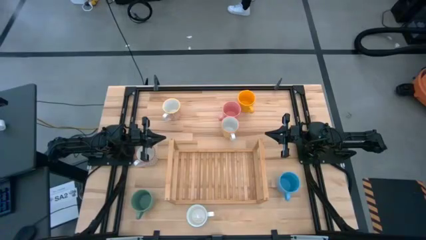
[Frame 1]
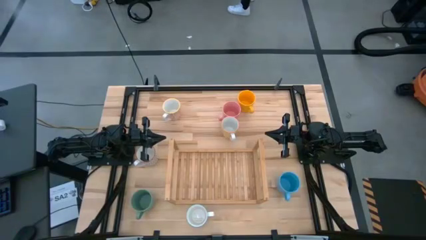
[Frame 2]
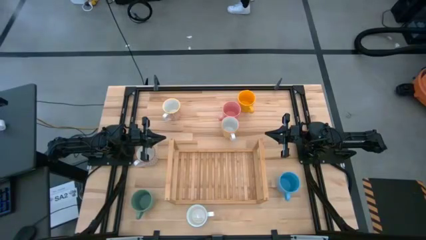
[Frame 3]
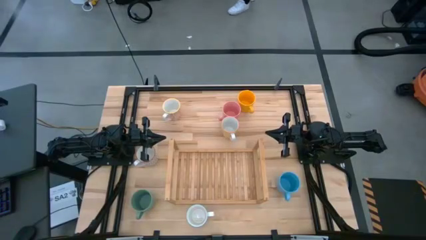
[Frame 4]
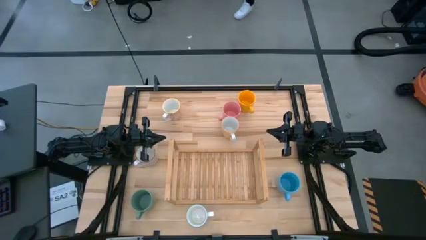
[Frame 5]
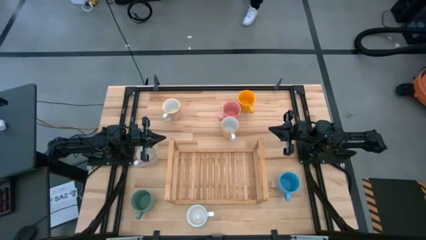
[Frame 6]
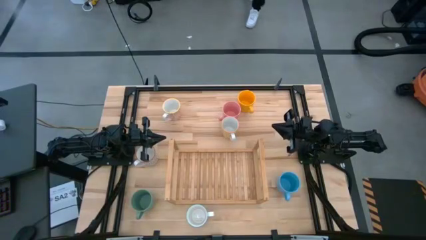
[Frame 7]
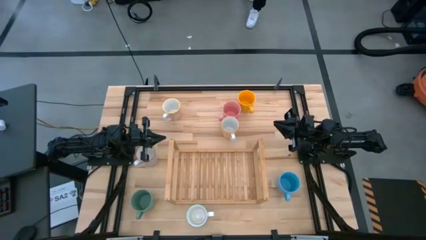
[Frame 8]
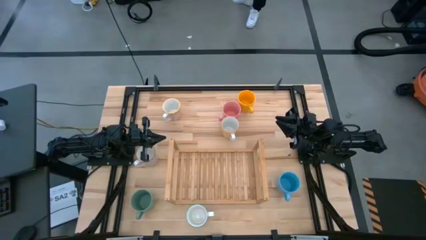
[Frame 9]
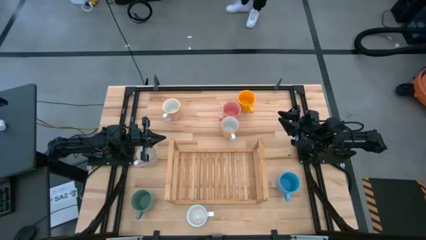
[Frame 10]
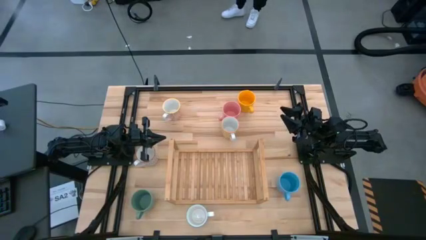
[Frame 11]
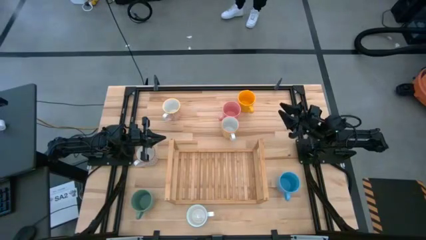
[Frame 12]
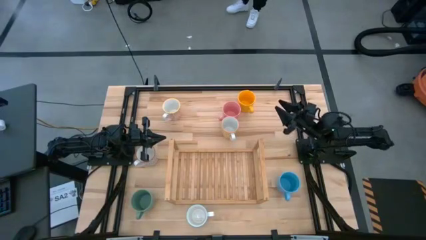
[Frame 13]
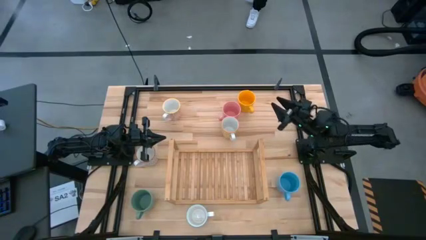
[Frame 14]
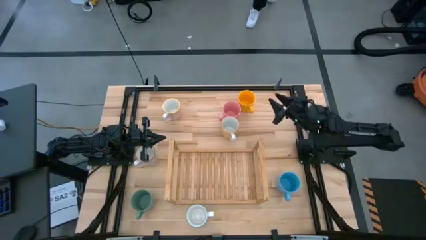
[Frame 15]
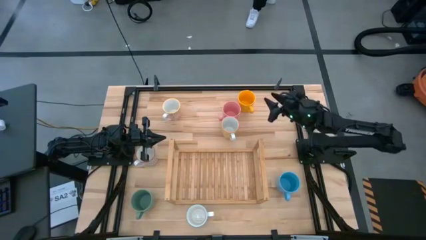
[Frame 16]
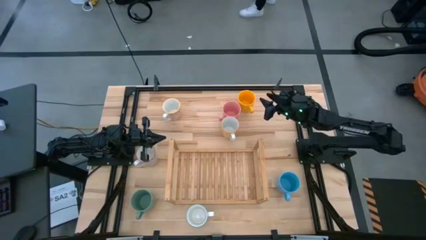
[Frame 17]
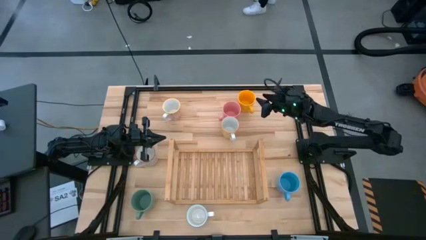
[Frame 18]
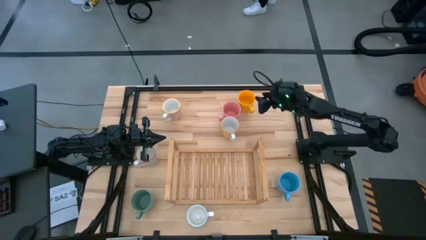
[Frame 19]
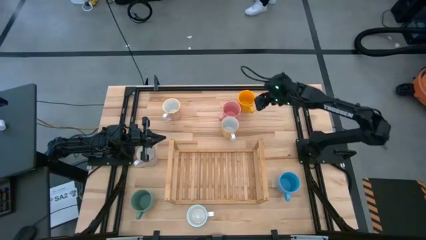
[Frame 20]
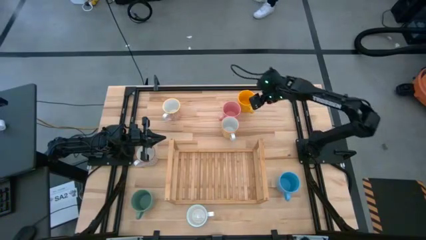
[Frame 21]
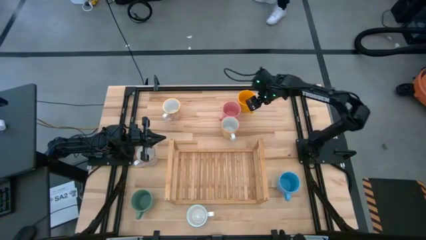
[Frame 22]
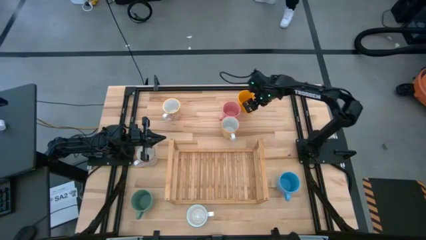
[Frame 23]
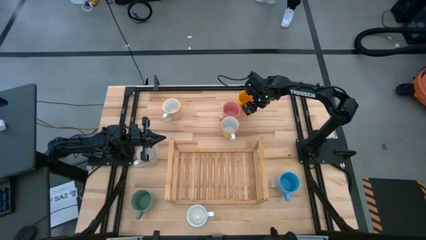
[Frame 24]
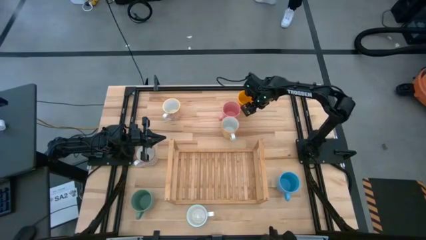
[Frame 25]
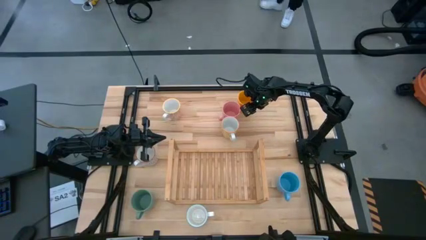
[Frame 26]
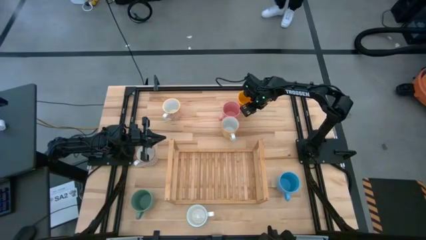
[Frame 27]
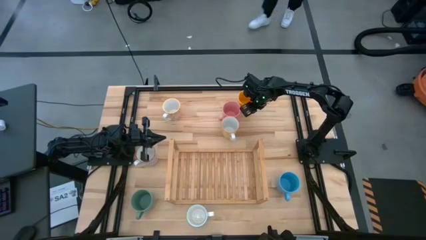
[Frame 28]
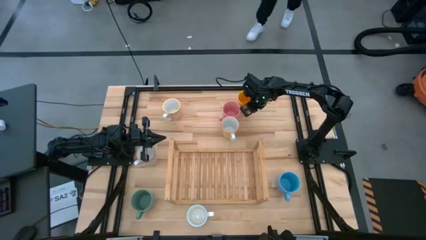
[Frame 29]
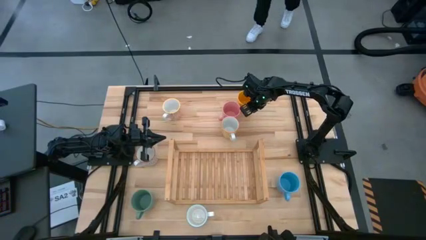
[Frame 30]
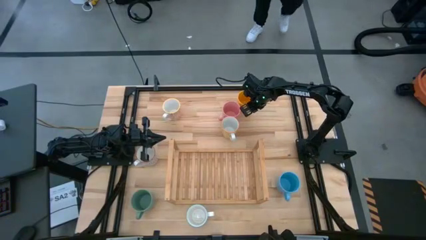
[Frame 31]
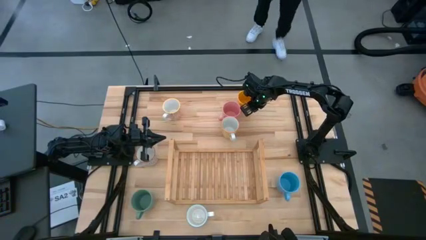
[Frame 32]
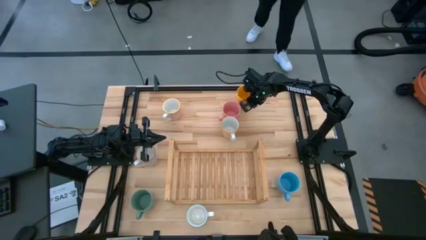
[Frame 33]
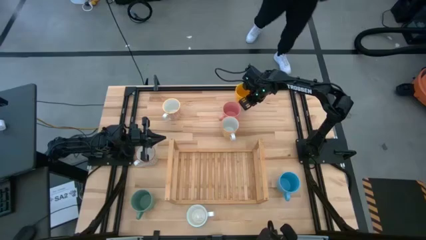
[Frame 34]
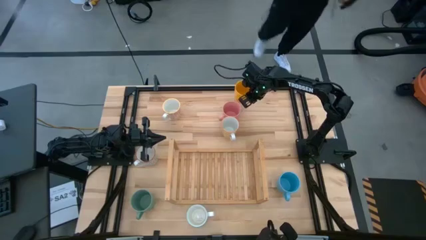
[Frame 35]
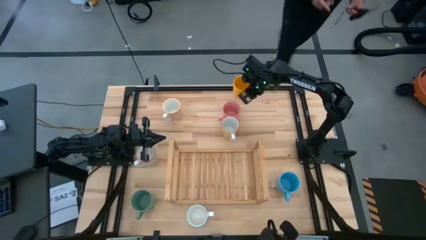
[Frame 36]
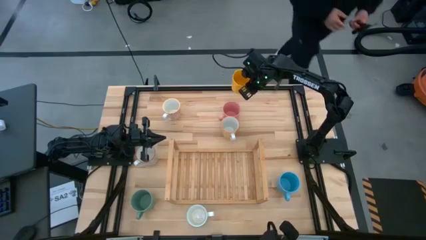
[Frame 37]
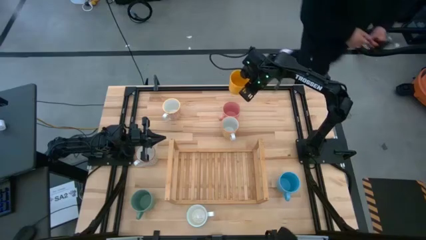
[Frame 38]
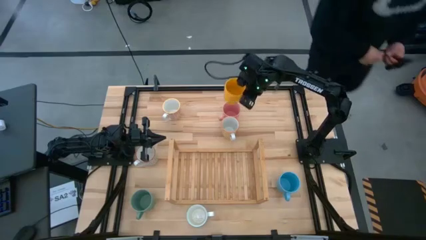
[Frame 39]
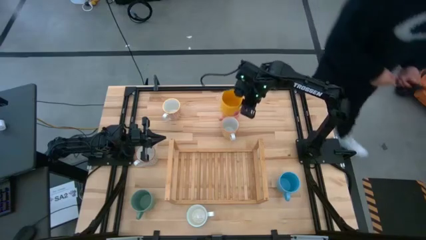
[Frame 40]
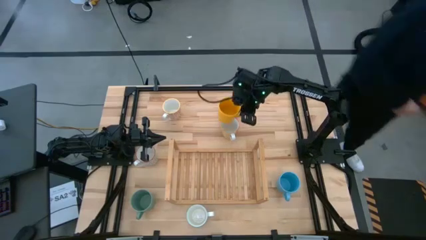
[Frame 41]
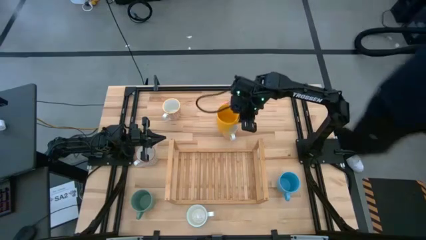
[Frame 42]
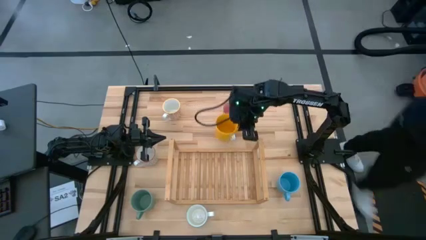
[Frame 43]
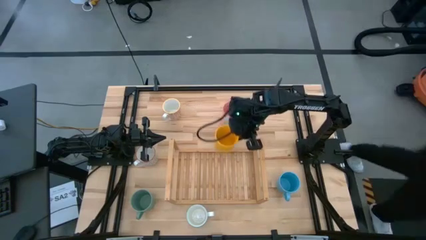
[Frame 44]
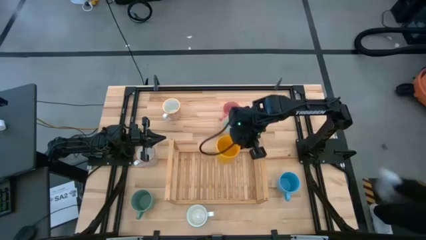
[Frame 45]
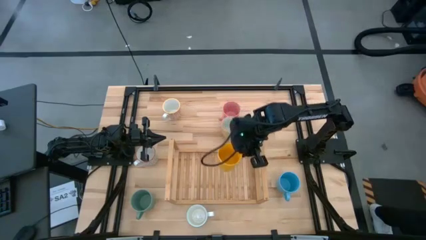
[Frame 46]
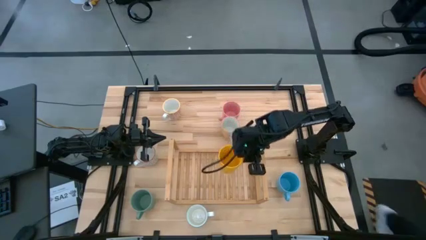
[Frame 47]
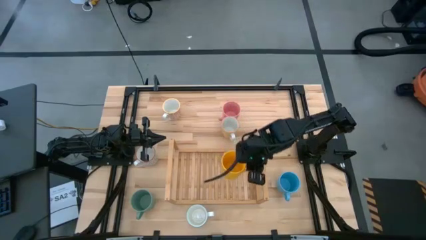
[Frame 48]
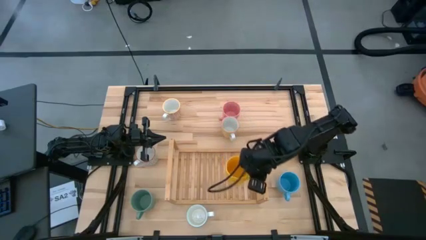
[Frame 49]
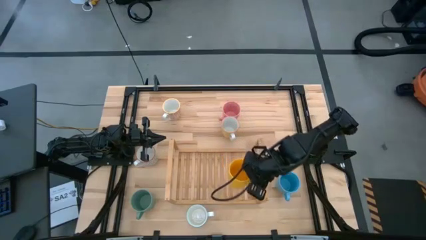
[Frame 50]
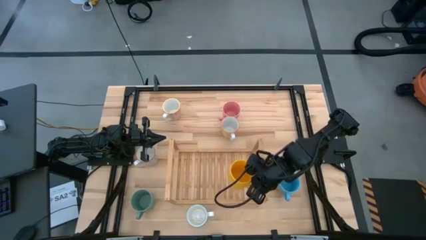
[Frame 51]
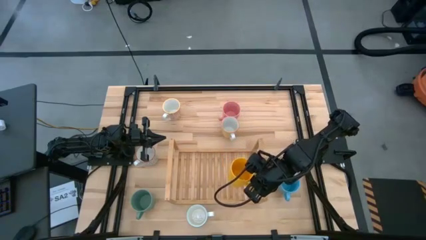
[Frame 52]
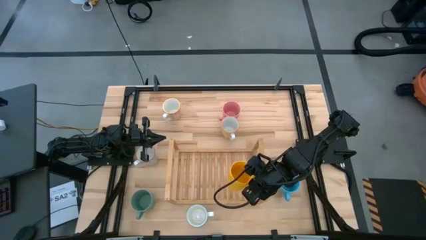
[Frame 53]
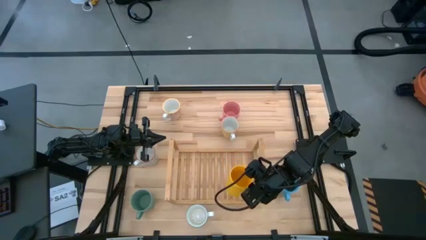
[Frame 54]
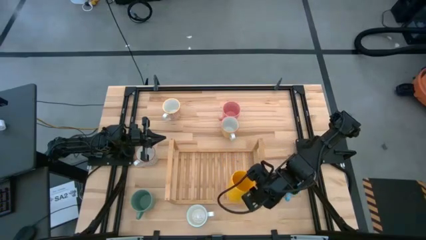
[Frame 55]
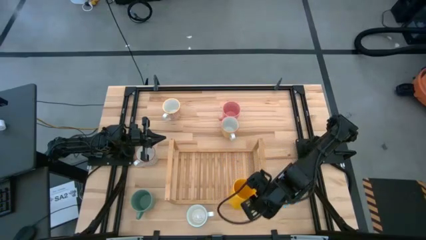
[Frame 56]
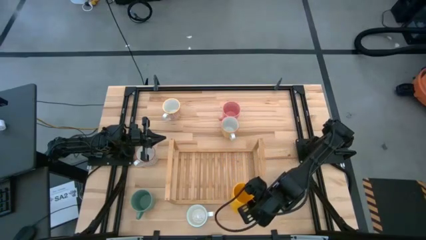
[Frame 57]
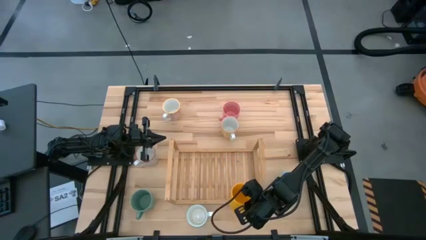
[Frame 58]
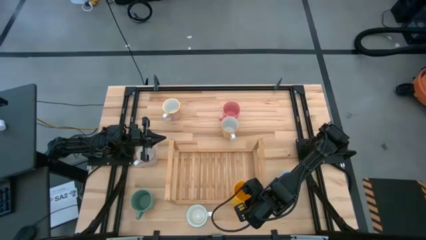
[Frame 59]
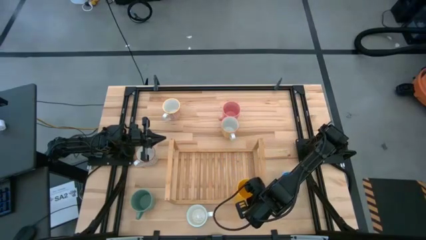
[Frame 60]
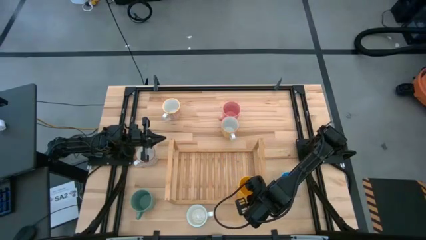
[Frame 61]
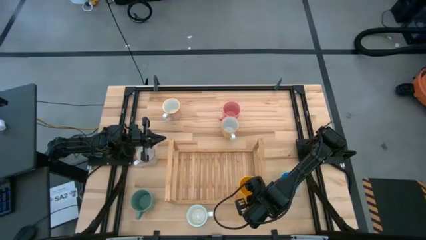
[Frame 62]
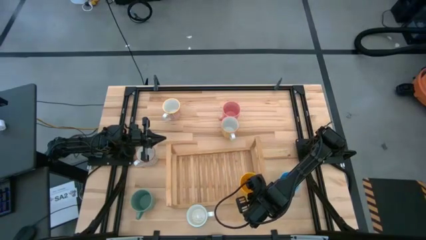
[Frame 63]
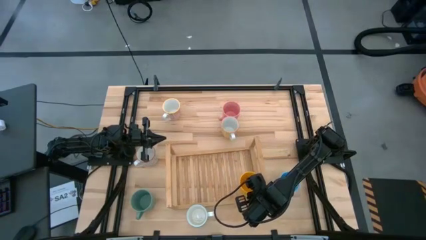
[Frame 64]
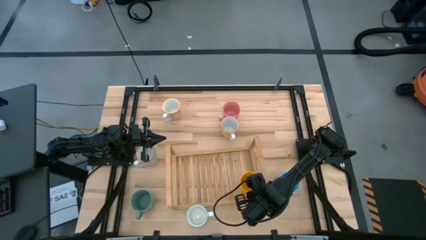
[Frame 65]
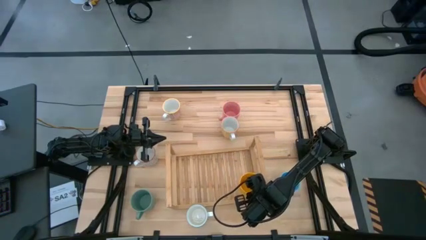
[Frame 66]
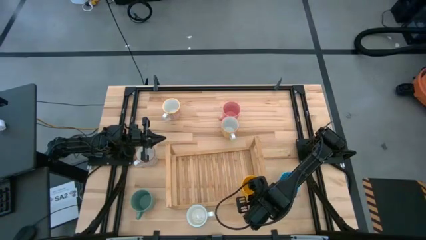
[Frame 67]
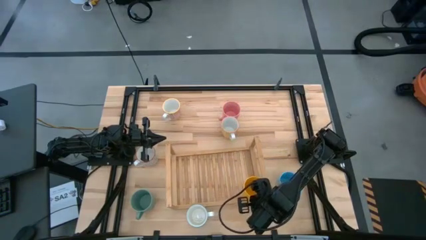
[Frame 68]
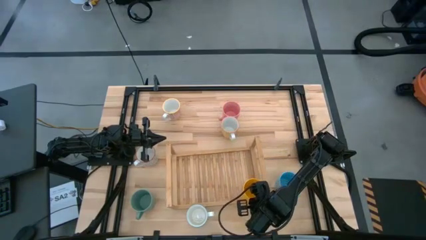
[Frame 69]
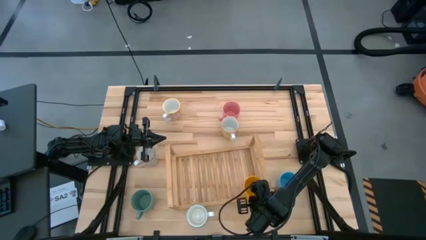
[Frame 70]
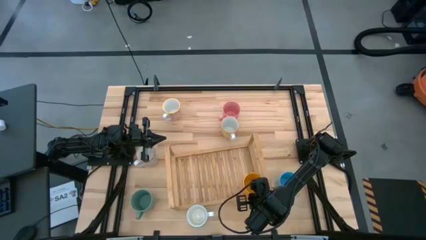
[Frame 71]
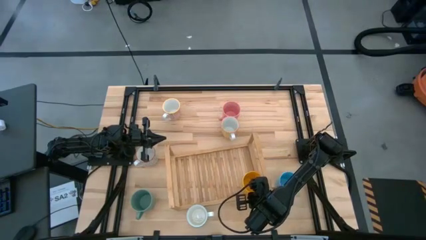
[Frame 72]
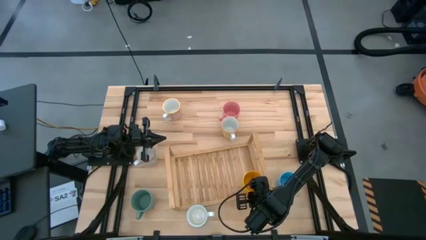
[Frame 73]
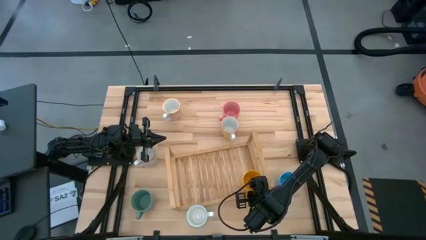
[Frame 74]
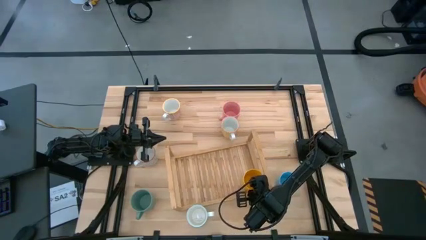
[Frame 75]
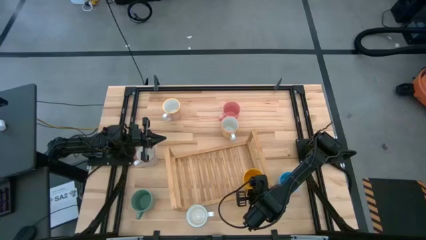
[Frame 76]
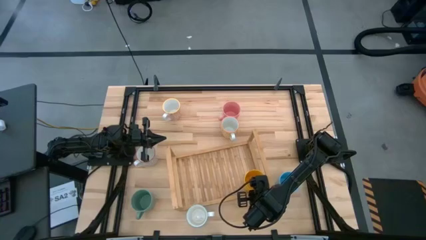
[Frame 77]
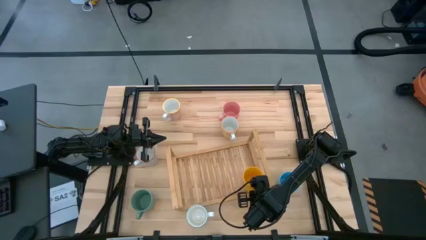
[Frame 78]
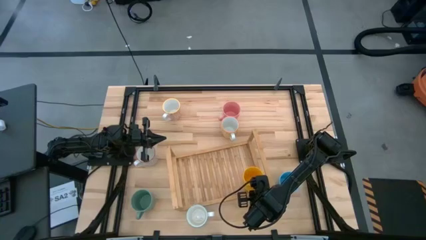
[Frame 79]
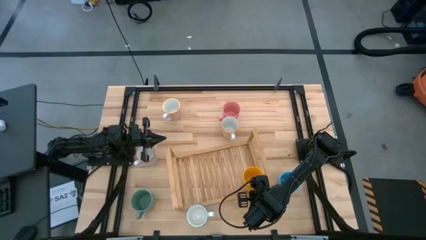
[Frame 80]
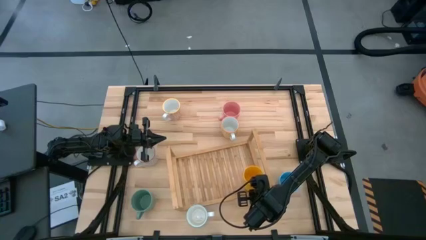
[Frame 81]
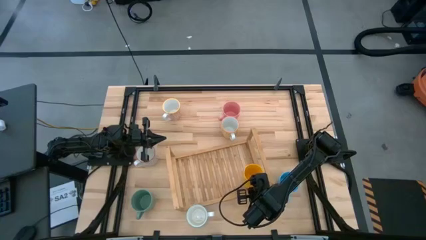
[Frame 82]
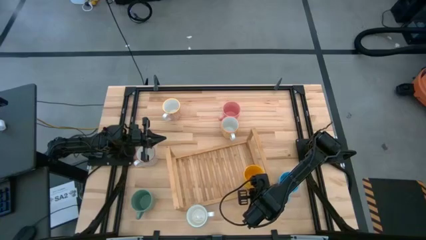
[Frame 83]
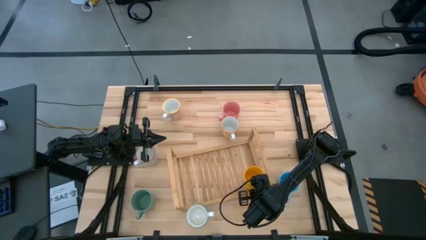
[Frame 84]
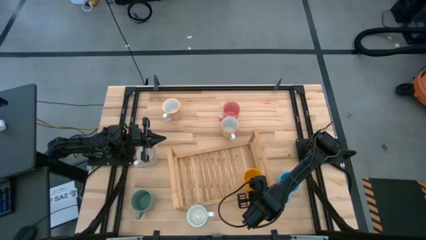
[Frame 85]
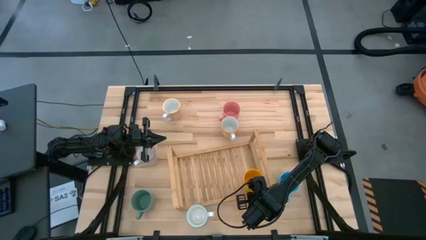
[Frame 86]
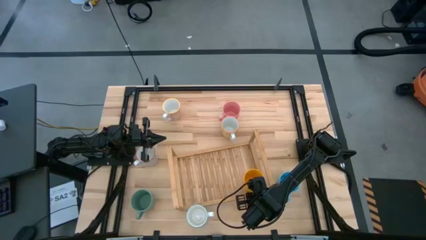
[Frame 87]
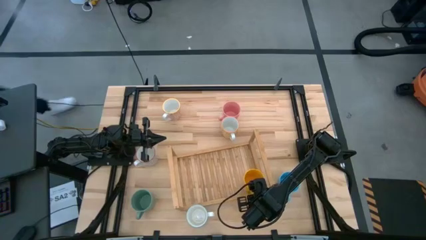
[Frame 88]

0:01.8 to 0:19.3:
Task: Place coffee mugs
Put the yellow mug on the shelf
